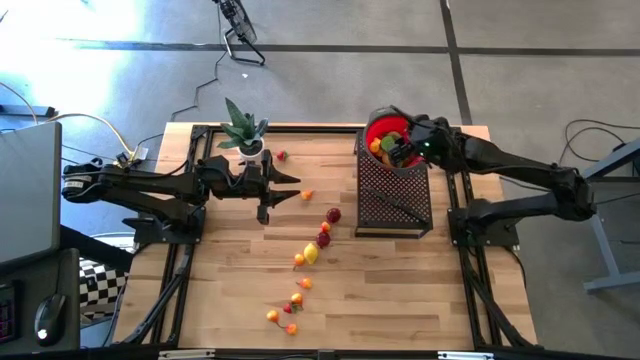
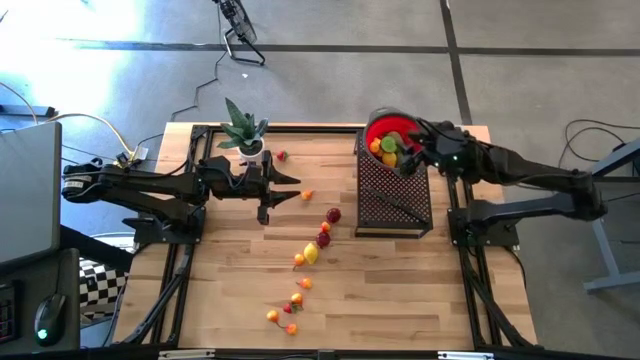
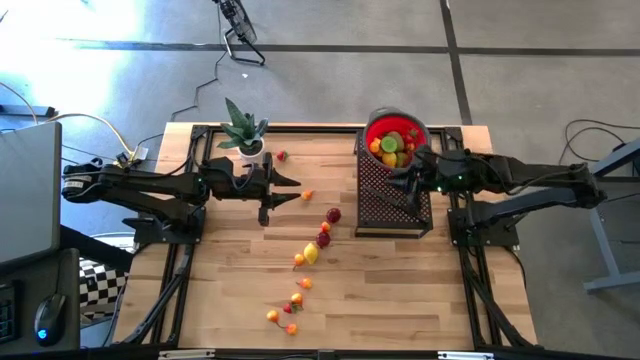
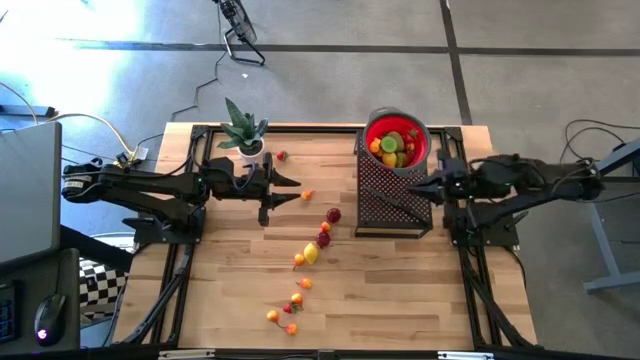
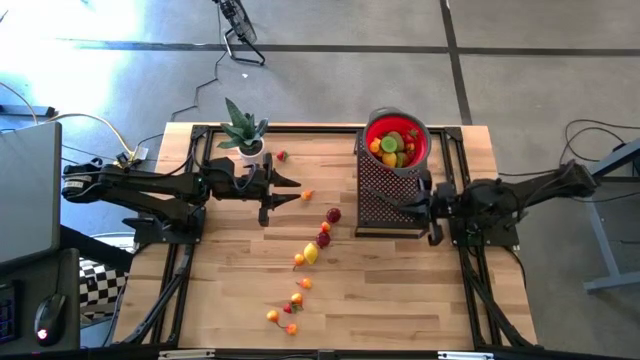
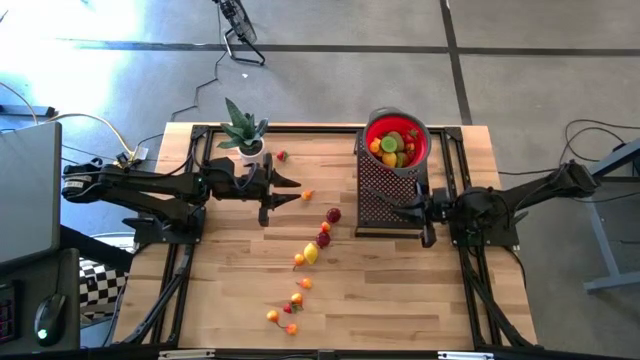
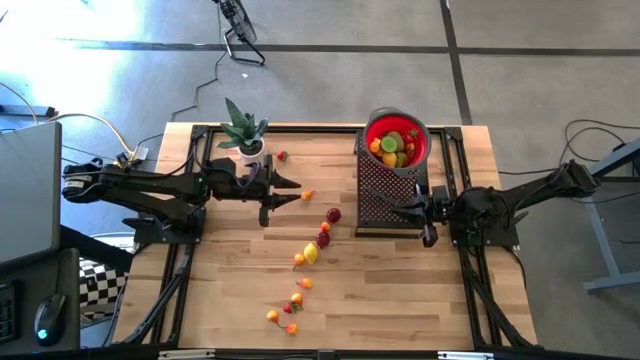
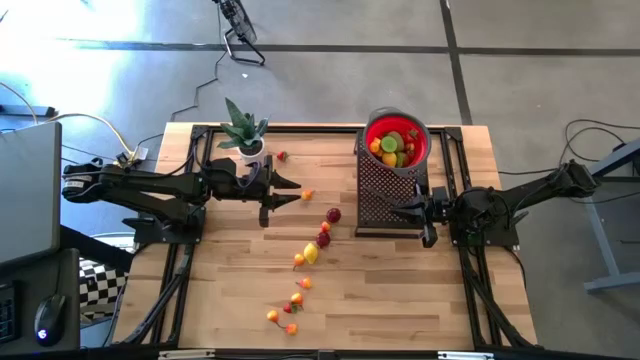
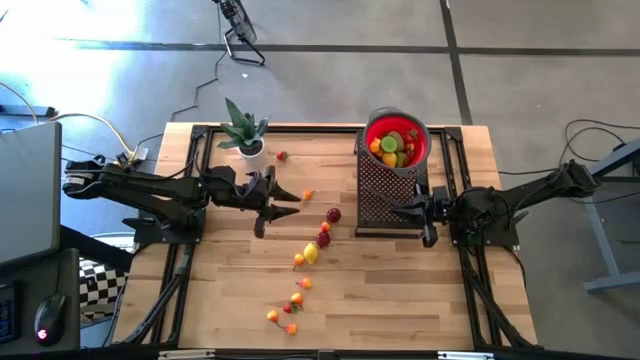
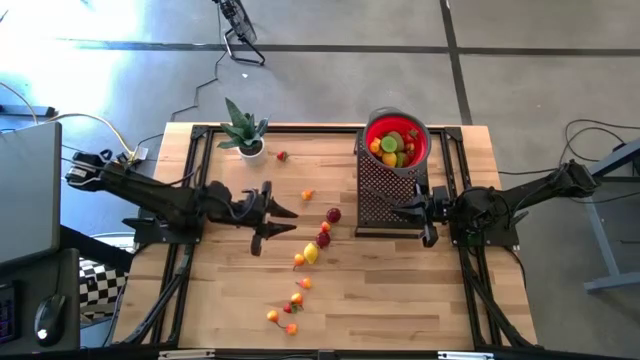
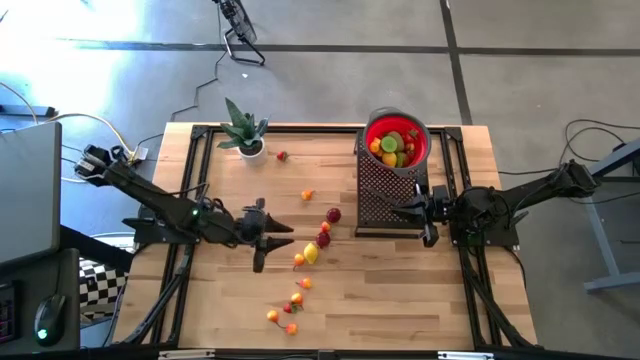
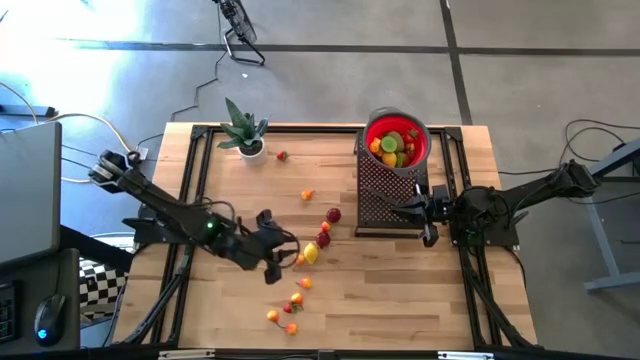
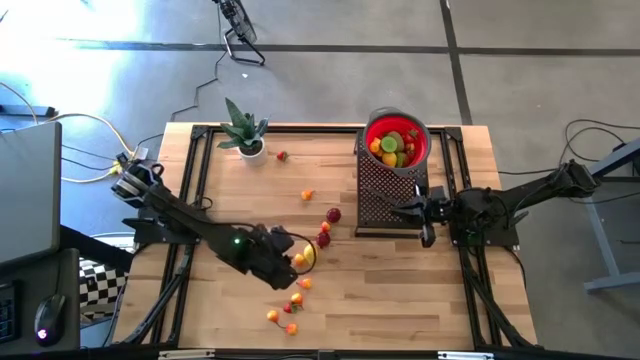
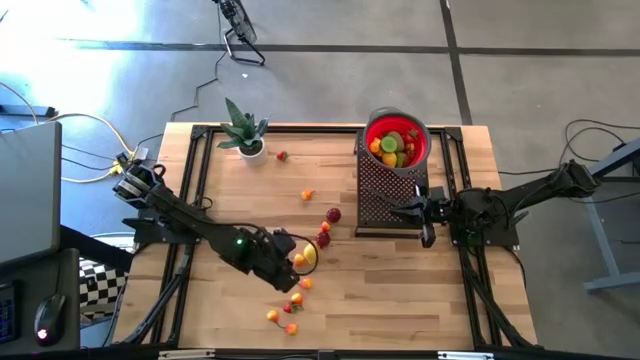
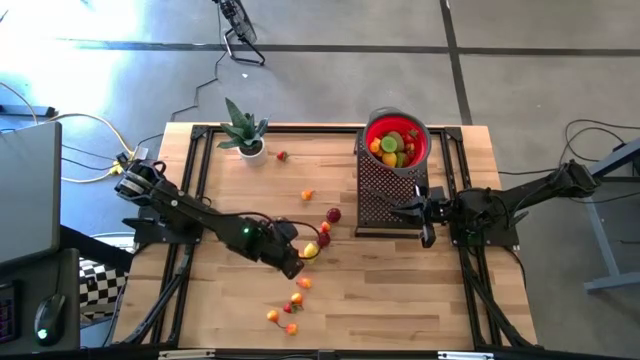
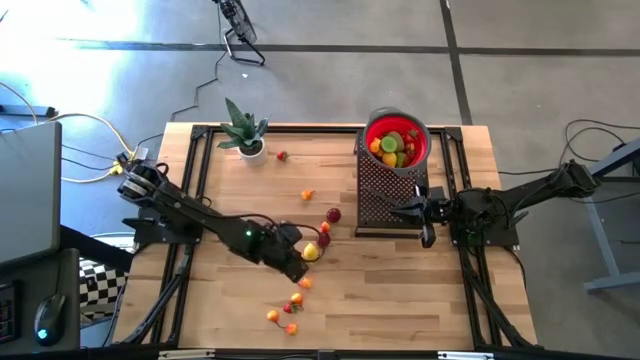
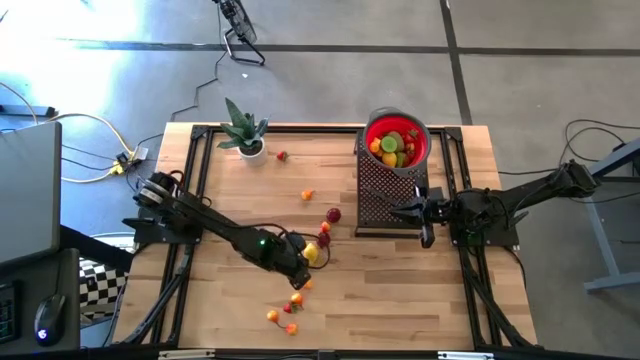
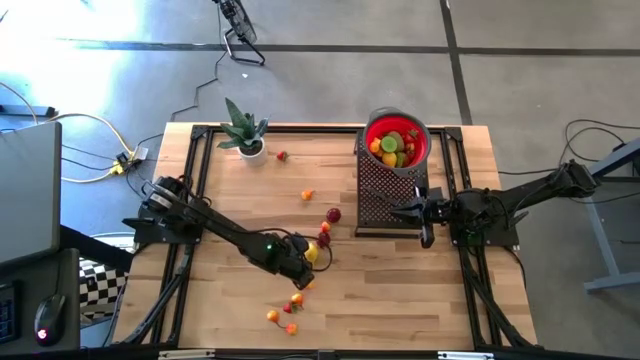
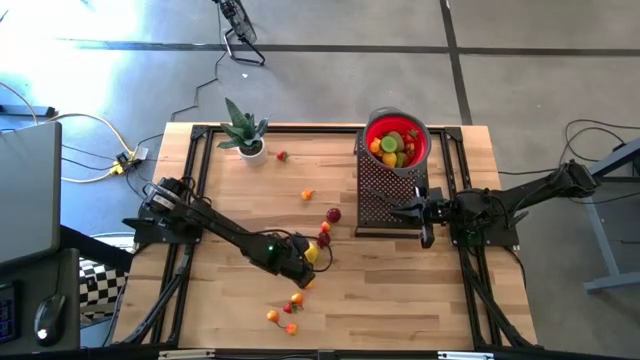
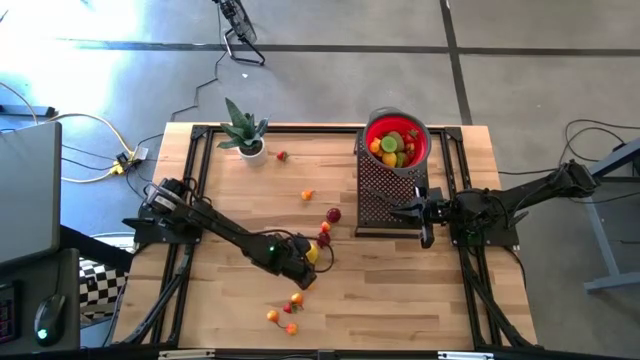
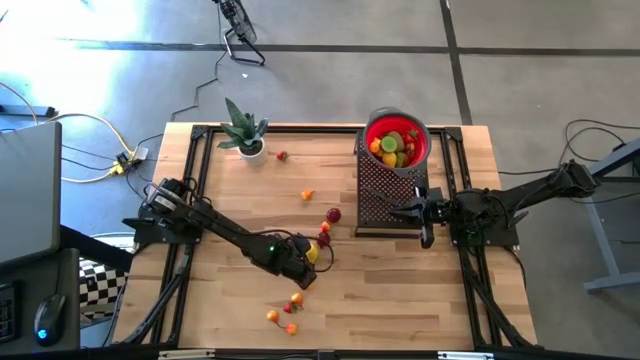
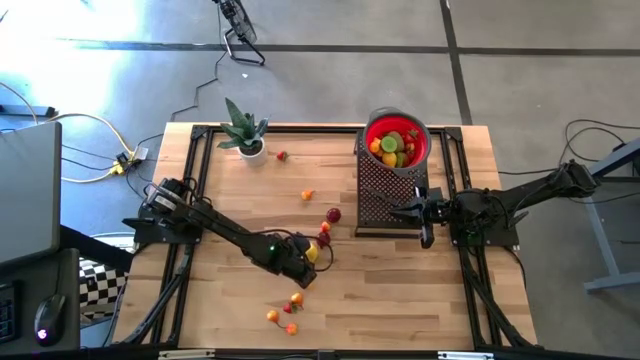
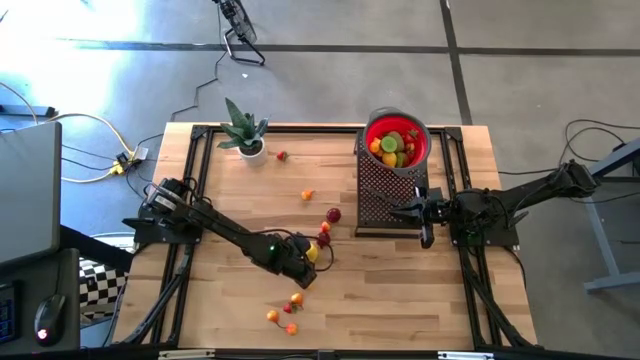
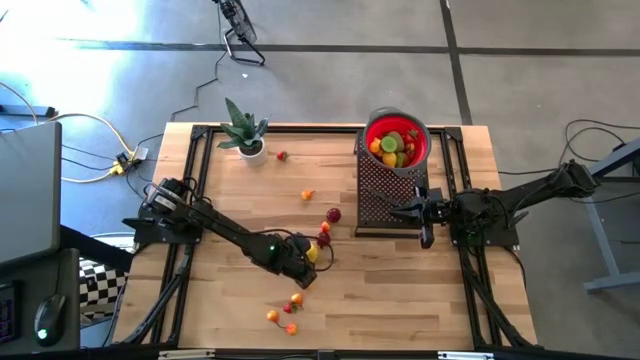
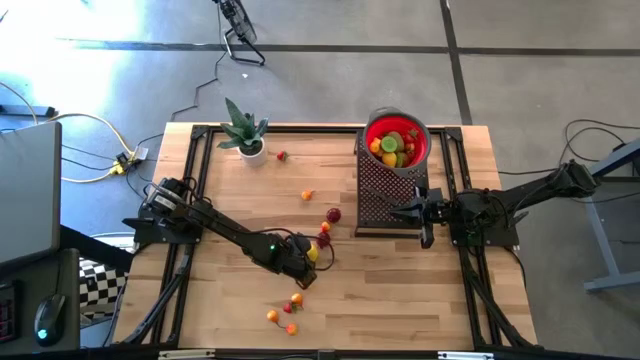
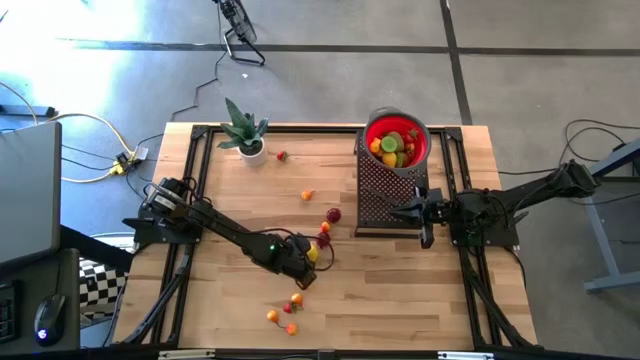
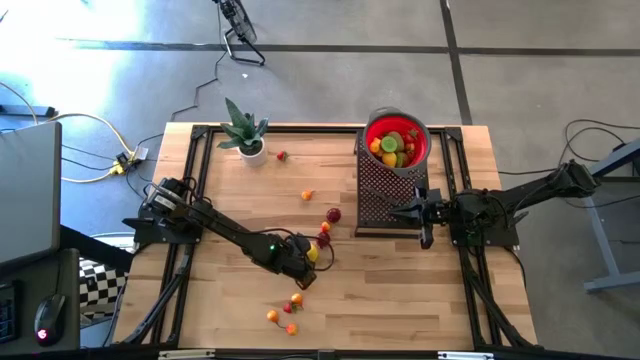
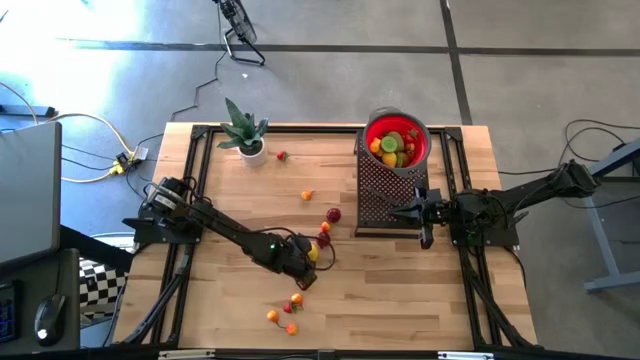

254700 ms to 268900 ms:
Task: Pick & Place Fruit
Put the pear into the strainer bowl on the shelf

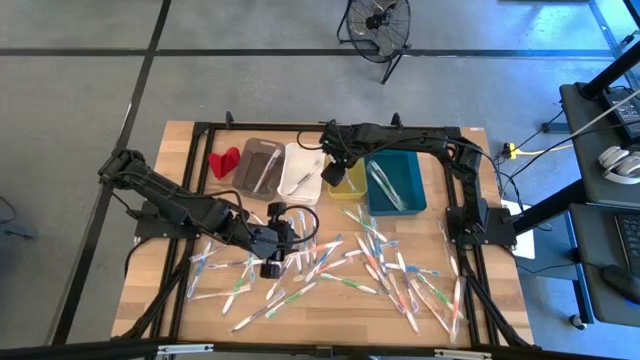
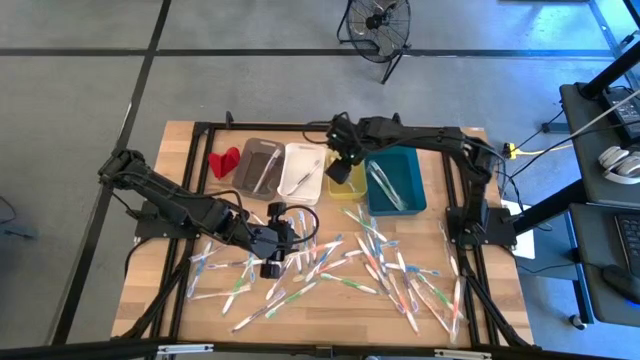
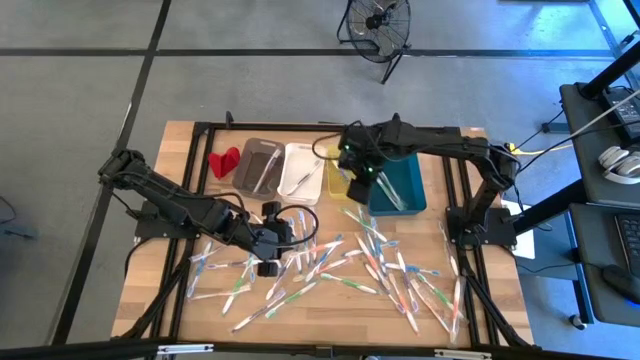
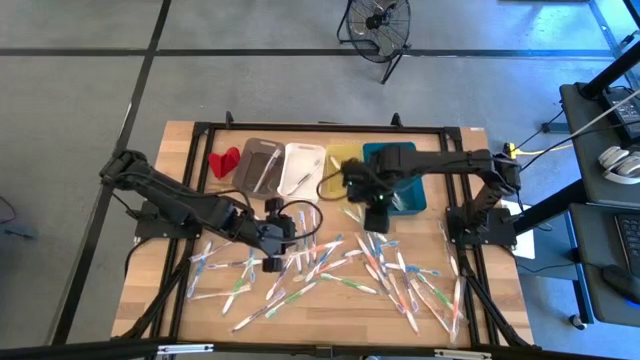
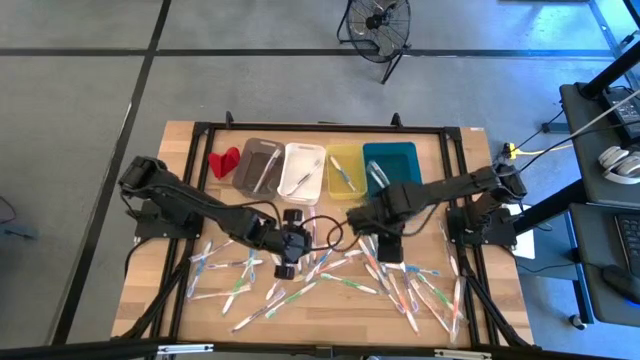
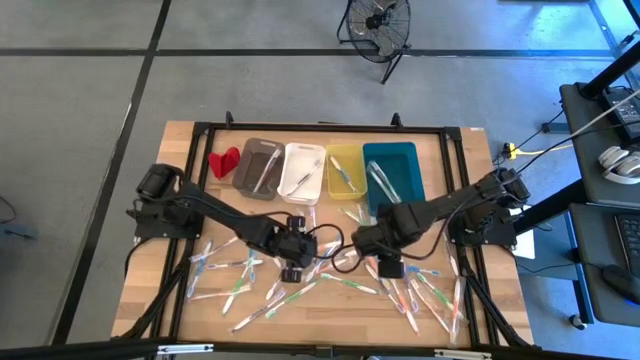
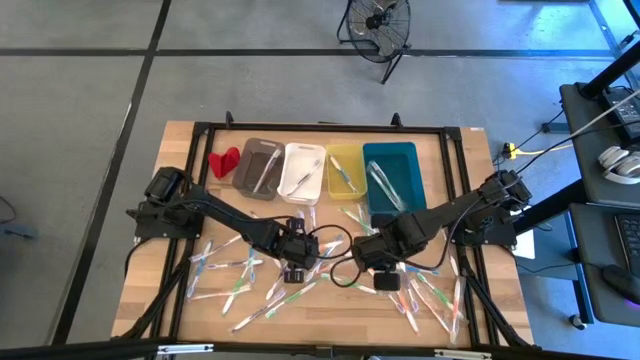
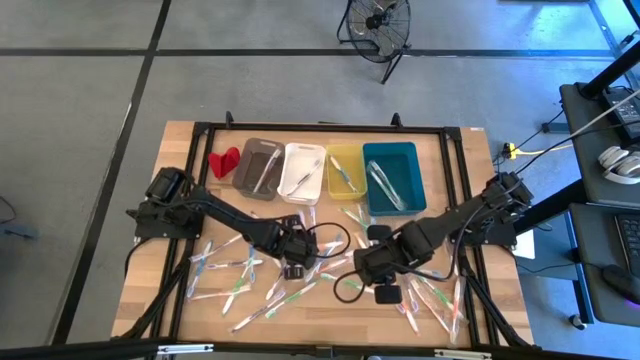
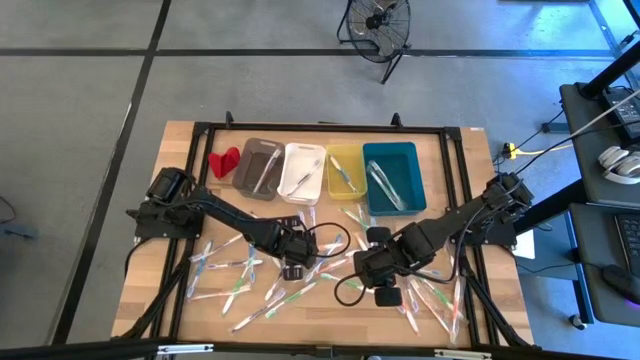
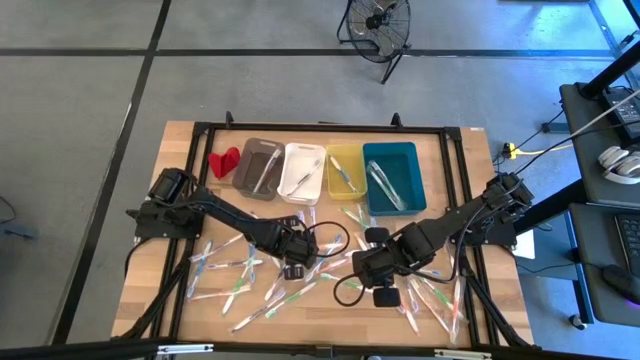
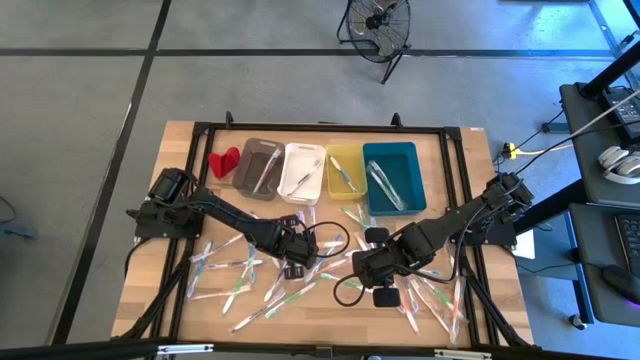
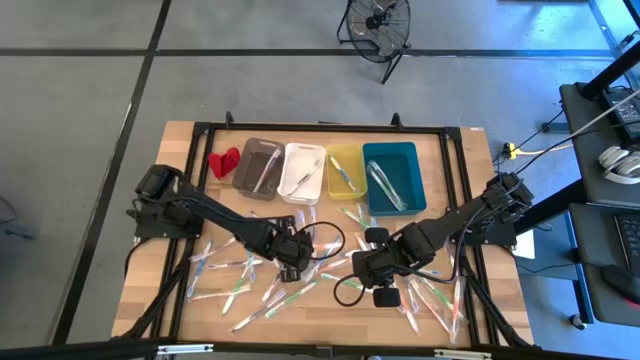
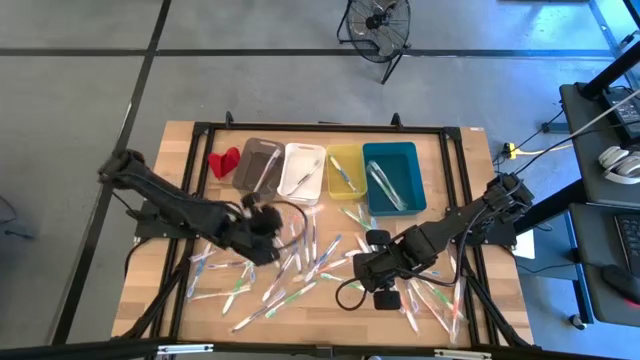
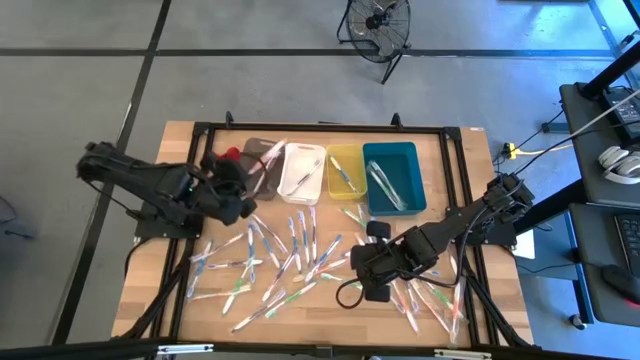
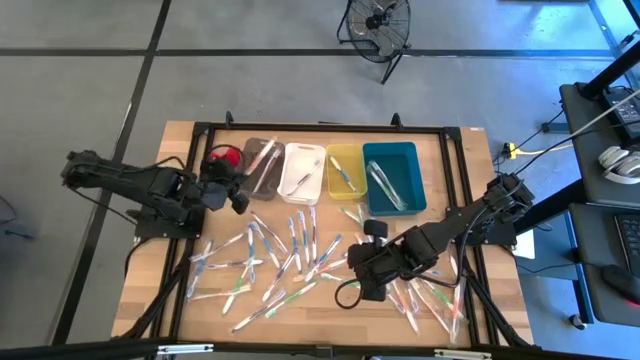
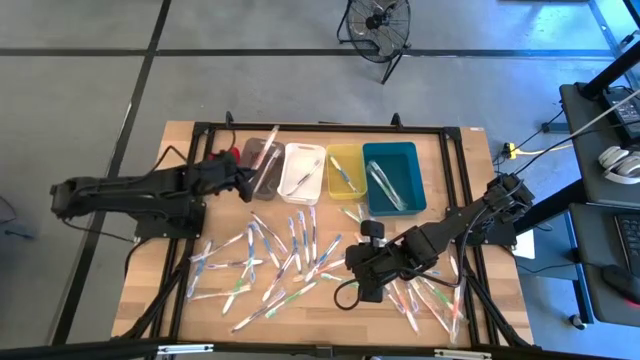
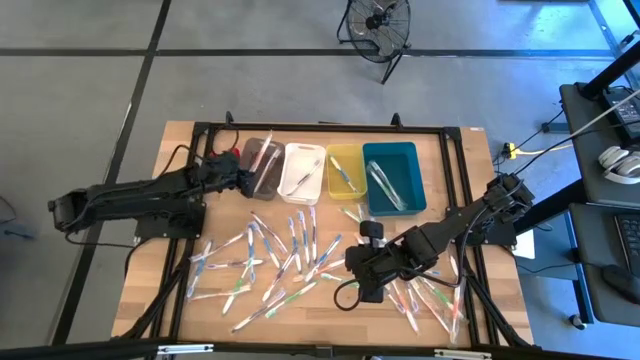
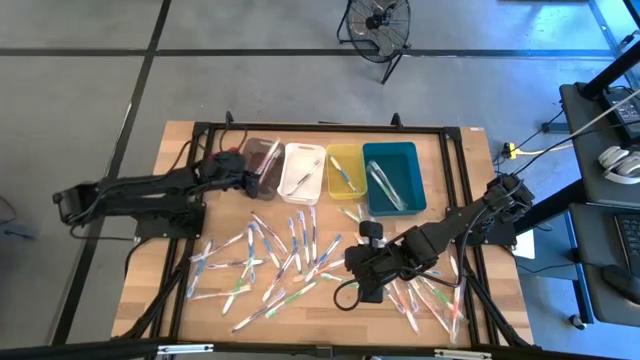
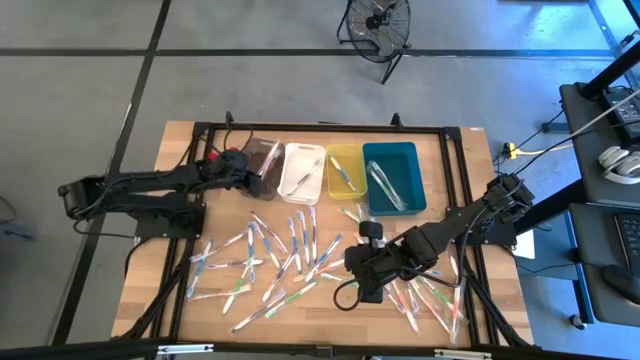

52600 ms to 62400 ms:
Task: Pick & Place Toothbrushes
Put the orange toothbrush into the black bin
